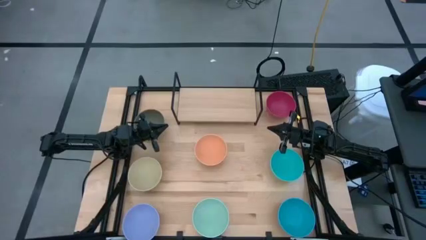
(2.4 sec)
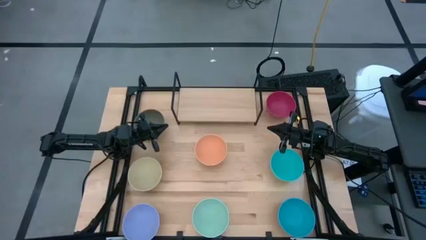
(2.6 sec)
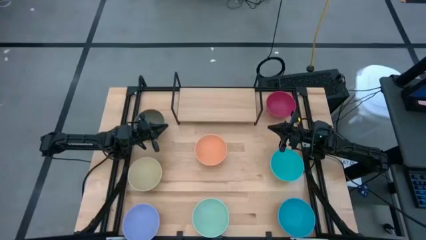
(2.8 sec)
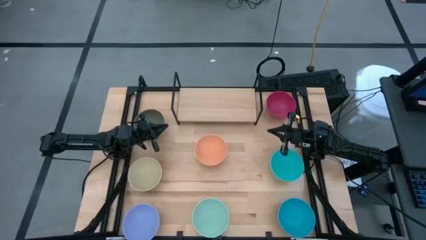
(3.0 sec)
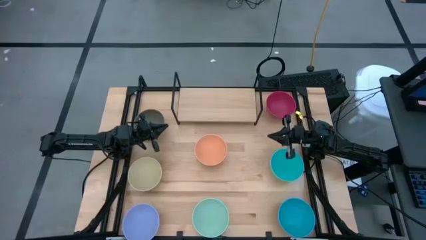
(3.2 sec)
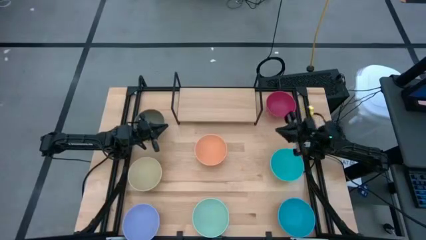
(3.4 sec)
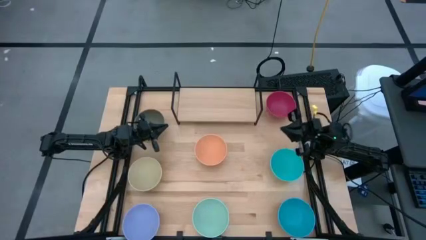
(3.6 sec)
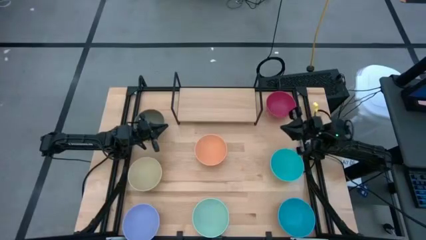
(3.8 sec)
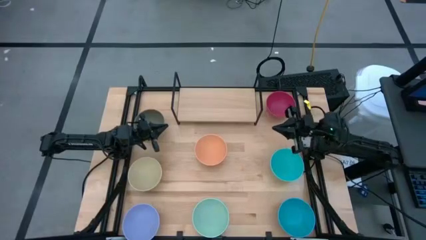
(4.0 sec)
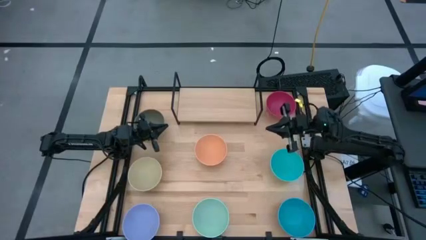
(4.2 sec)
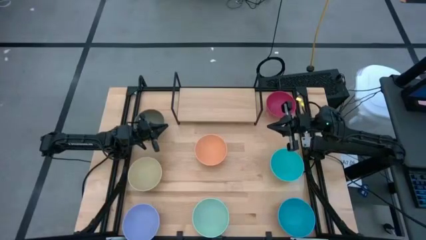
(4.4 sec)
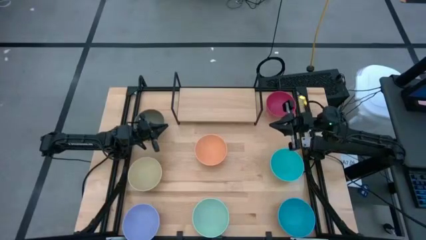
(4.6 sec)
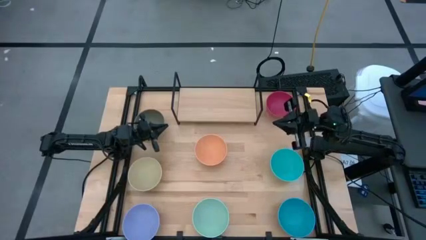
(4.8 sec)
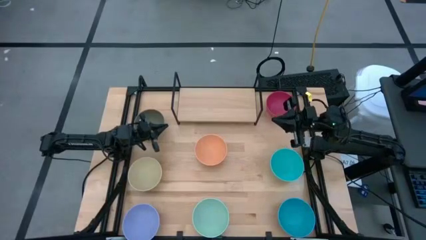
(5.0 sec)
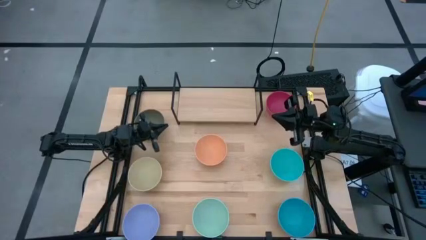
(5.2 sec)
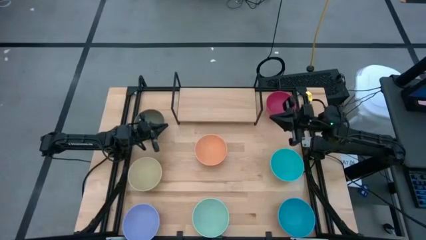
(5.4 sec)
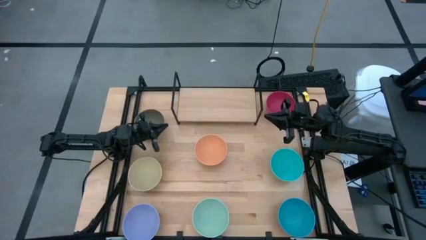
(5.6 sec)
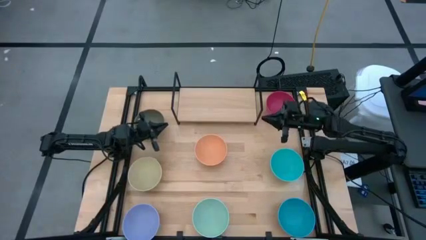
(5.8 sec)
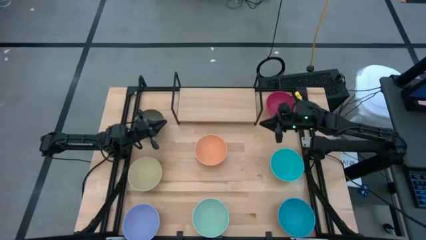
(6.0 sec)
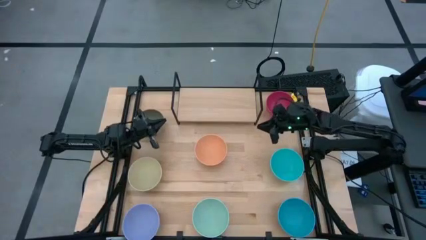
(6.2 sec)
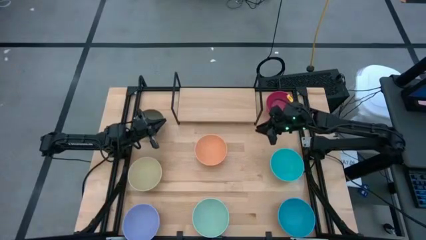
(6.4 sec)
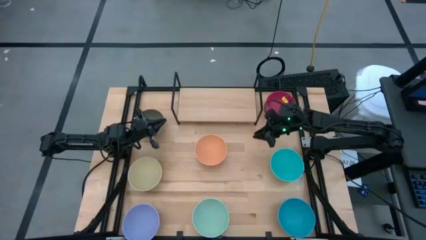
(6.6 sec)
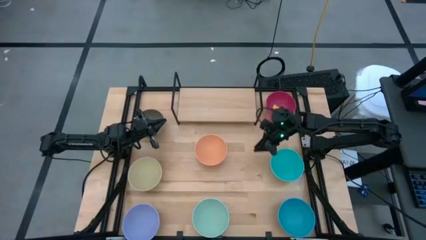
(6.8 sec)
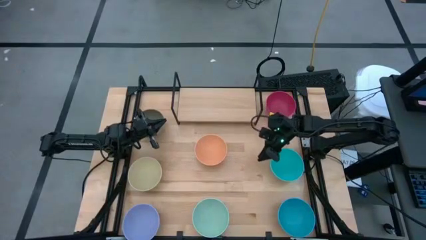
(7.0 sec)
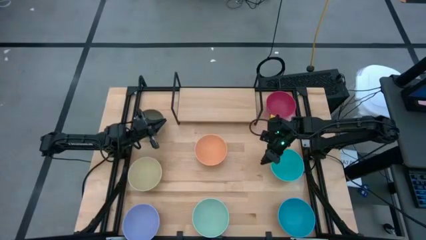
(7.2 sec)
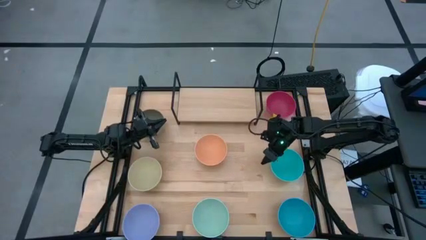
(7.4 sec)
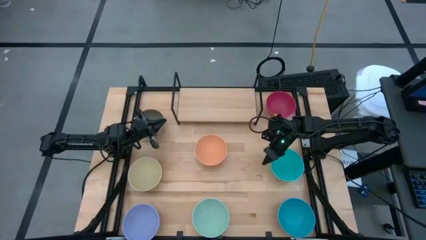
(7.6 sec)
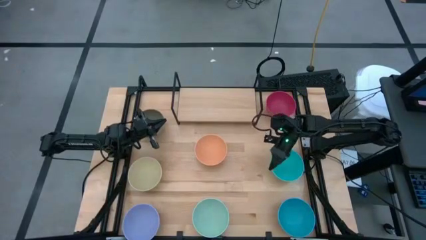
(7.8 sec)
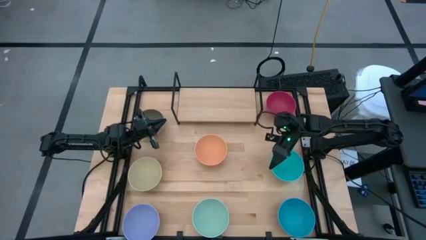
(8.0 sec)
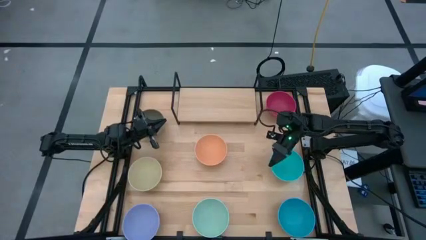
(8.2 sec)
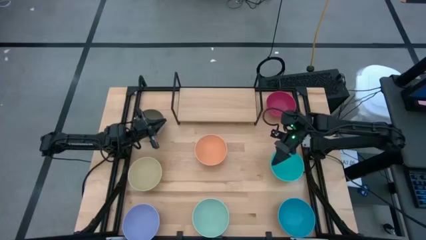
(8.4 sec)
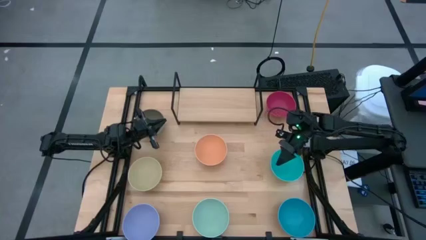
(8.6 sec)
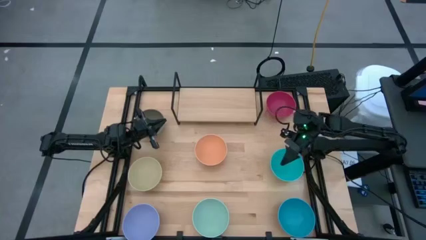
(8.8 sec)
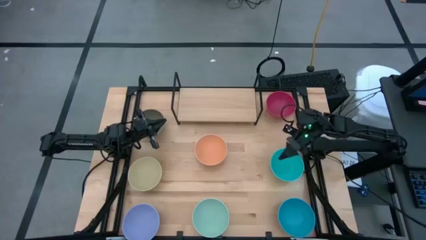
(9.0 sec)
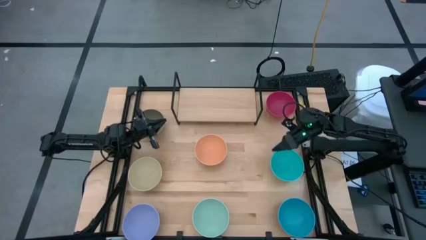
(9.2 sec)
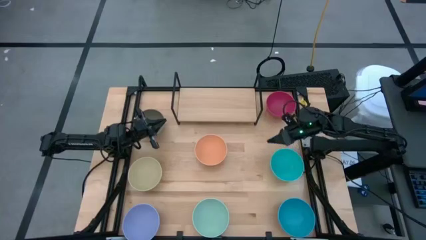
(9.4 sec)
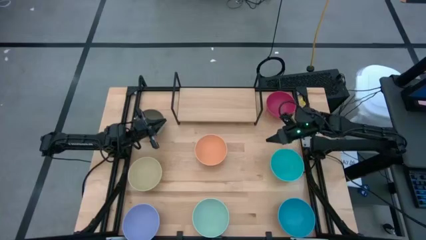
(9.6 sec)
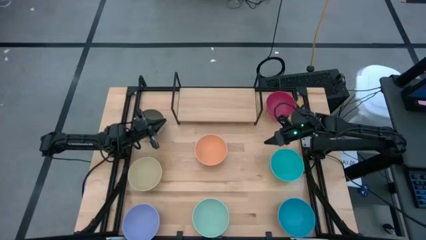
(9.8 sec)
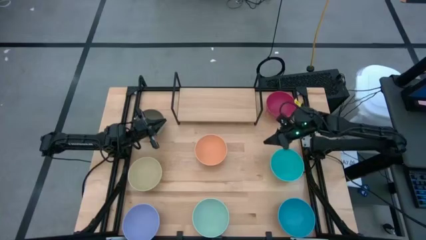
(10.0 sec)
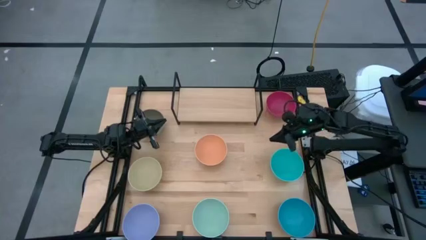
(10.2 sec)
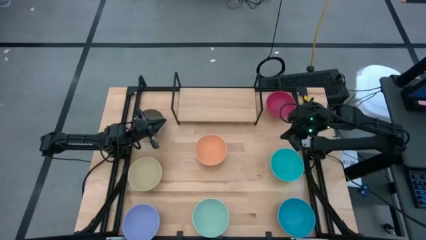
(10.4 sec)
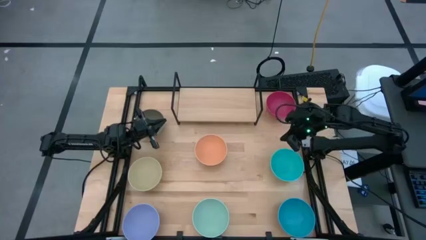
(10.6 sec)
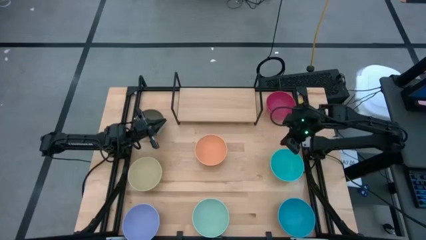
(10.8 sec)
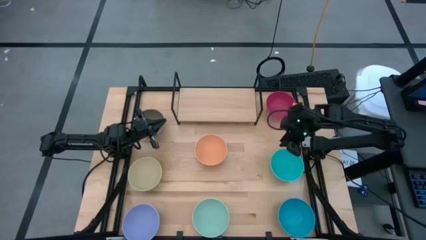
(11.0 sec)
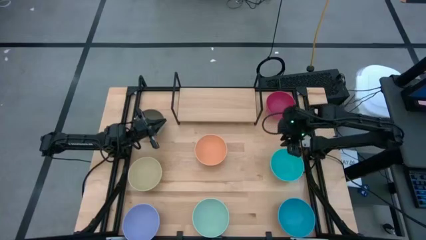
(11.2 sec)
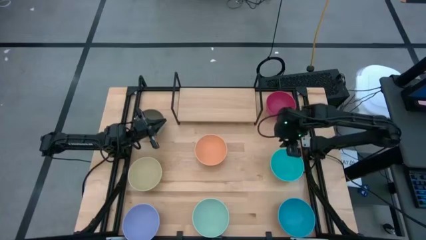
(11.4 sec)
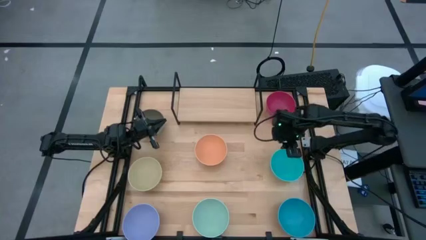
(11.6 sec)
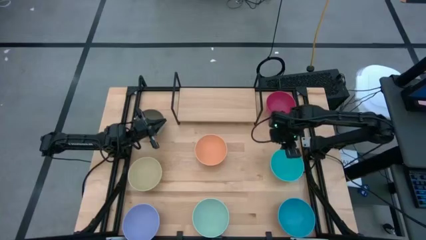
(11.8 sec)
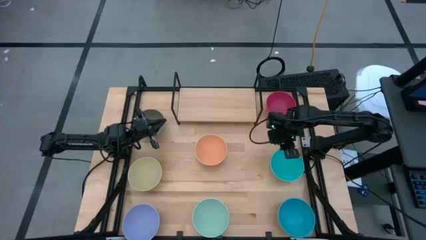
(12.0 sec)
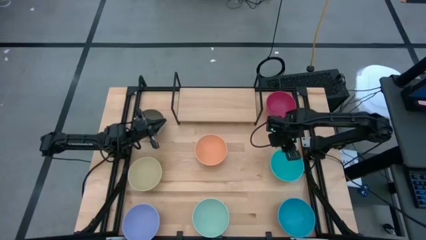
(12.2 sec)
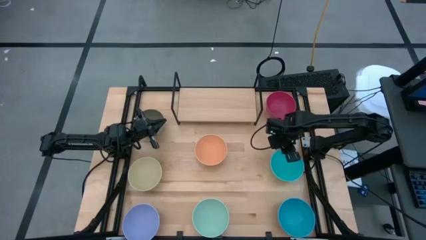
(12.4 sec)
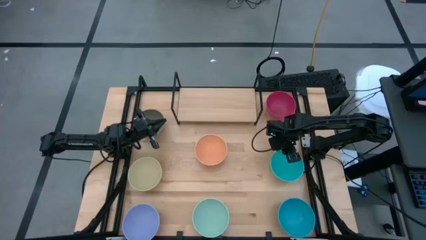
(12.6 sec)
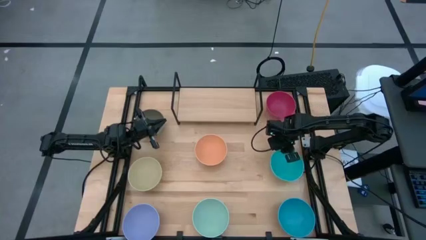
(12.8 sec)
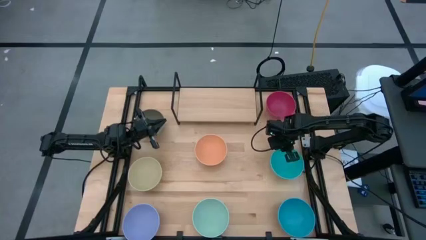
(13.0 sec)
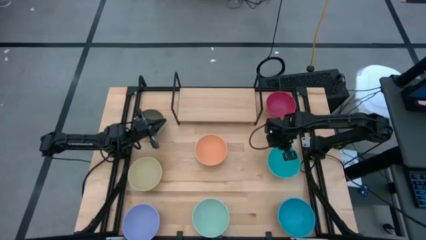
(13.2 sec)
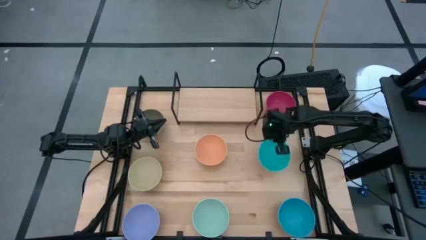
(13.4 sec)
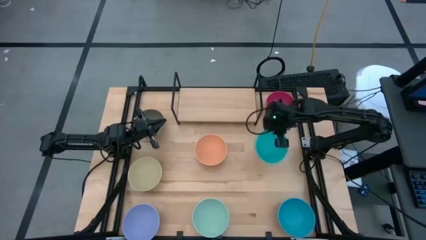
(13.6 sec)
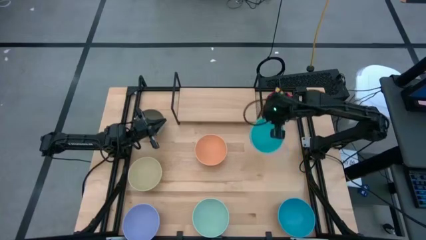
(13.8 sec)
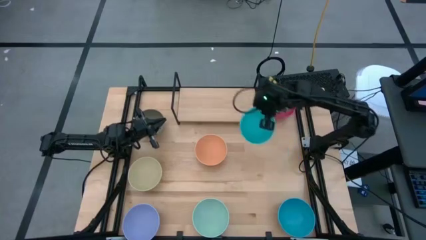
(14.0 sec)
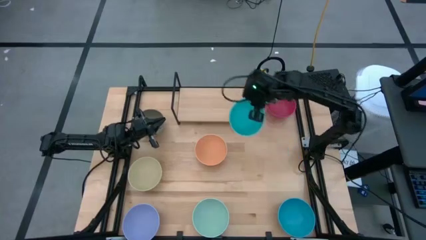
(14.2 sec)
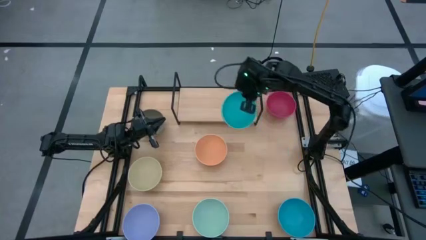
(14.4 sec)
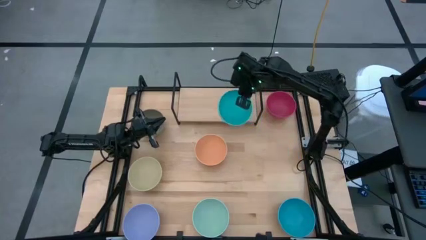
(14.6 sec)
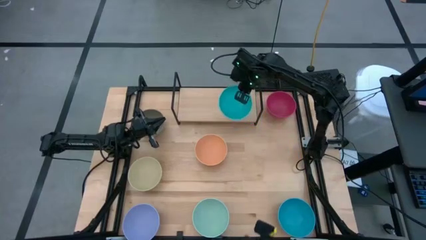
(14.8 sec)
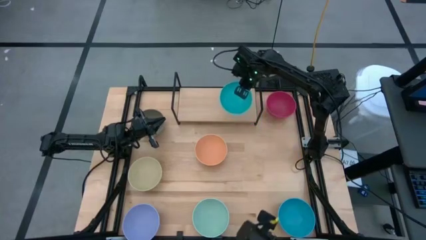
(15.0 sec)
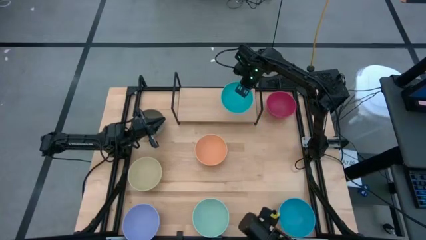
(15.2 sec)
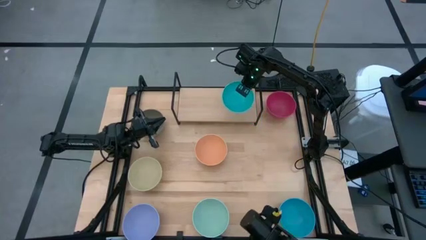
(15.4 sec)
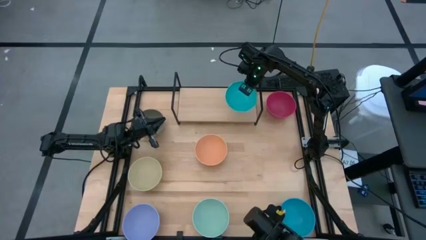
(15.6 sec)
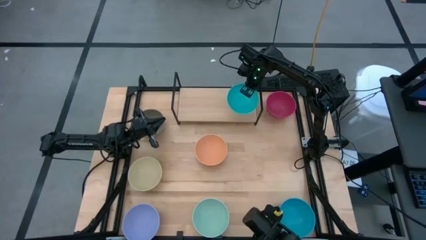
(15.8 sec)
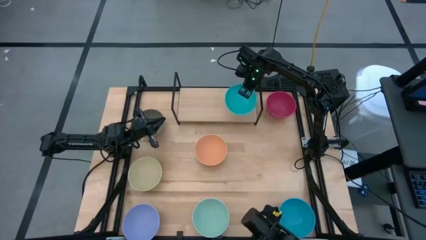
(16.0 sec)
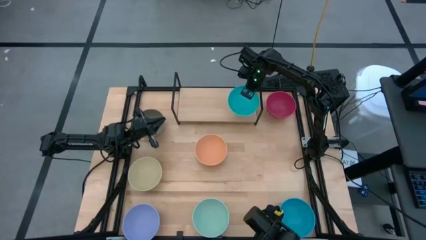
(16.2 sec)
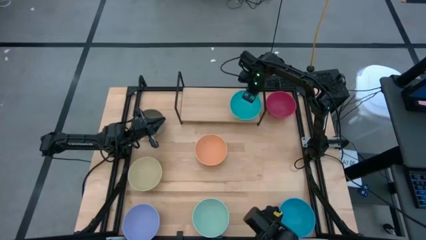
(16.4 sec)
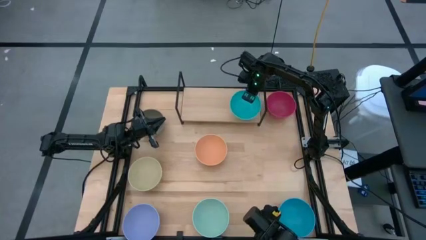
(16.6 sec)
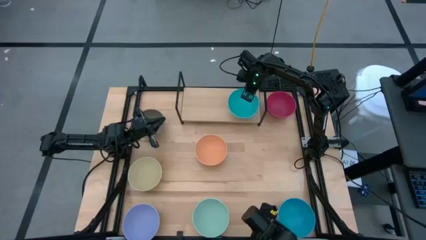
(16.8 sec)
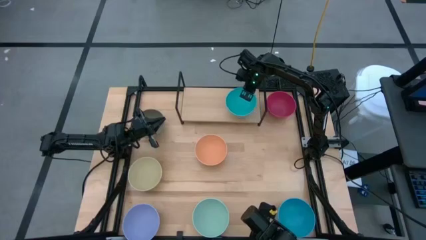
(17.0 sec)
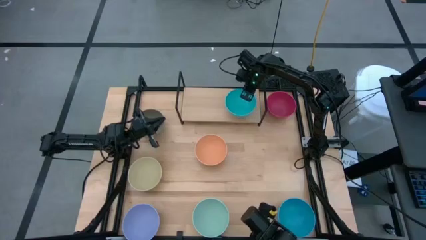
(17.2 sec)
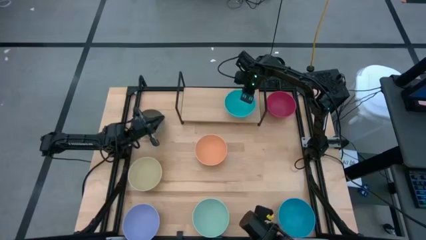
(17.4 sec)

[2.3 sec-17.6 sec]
Task: Place and stack bowls onto a shelf
Put the green bowl on the shelf
